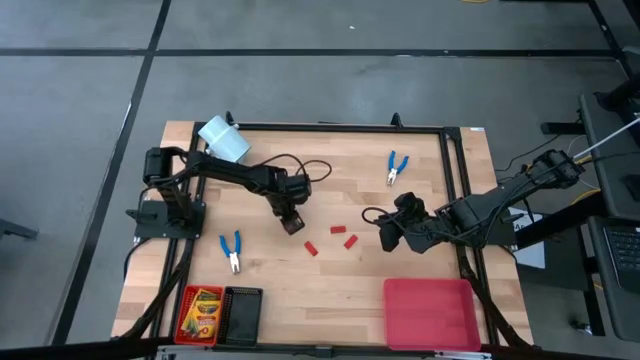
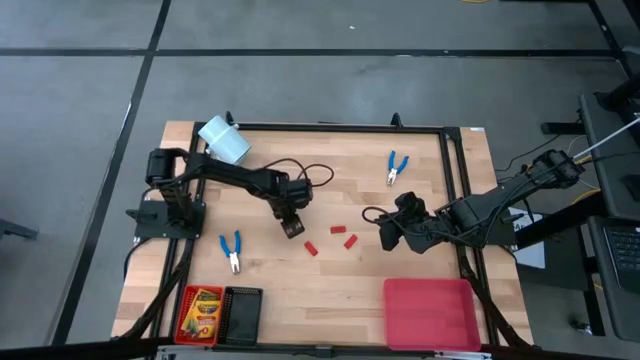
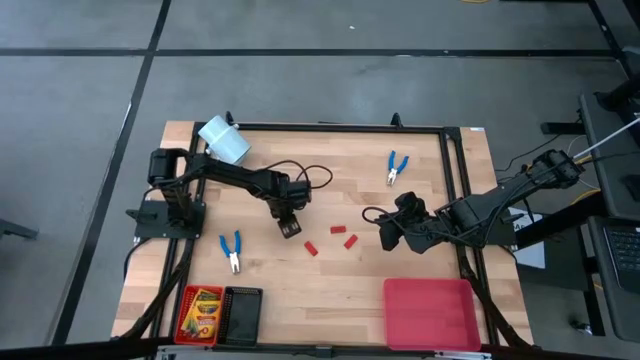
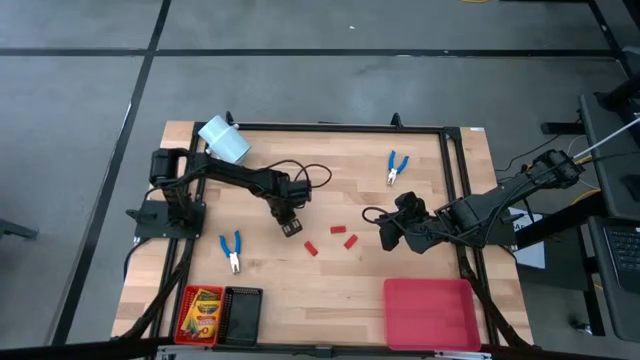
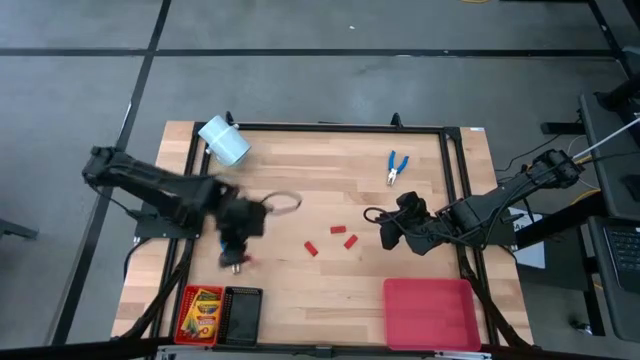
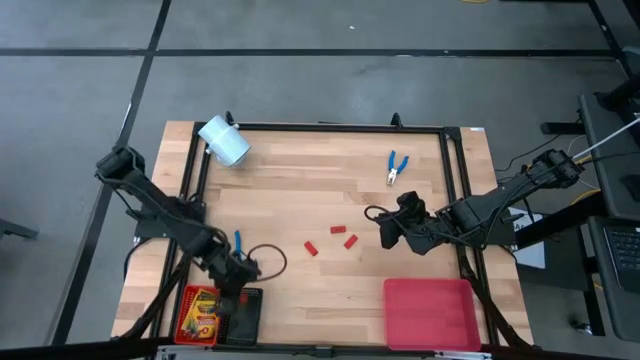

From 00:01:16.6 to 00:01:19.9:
Task: Pick & Place School Supplies
Put the red eraser into the black basket

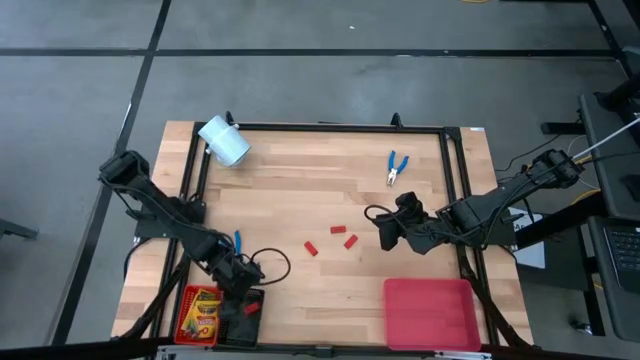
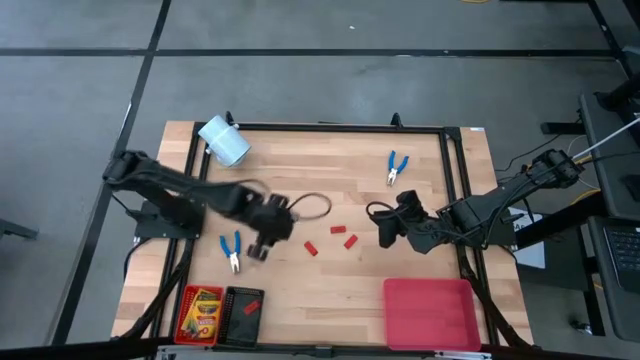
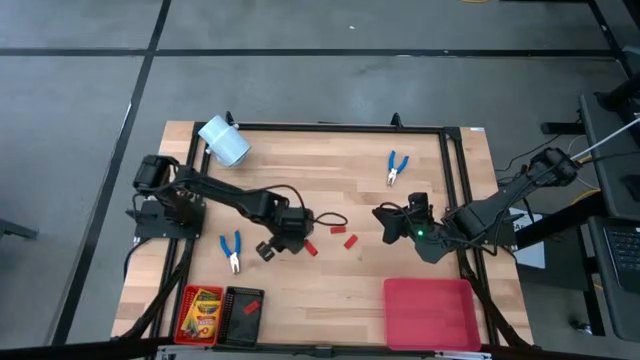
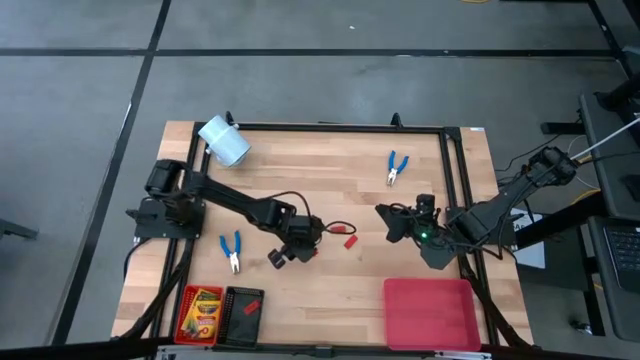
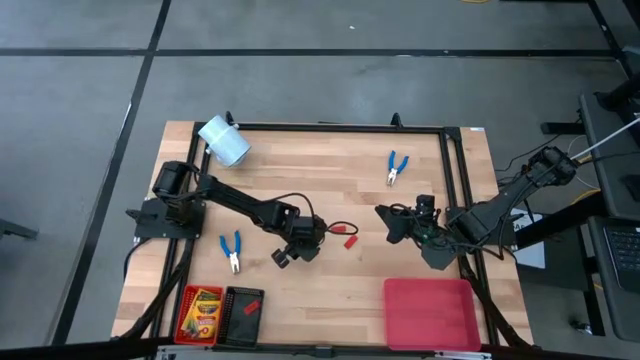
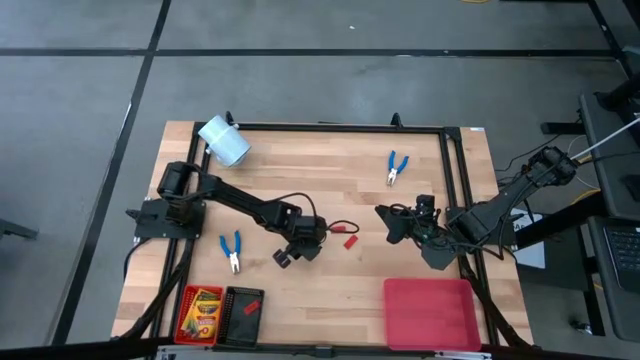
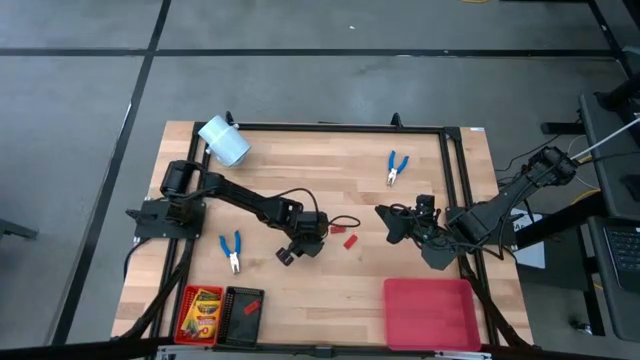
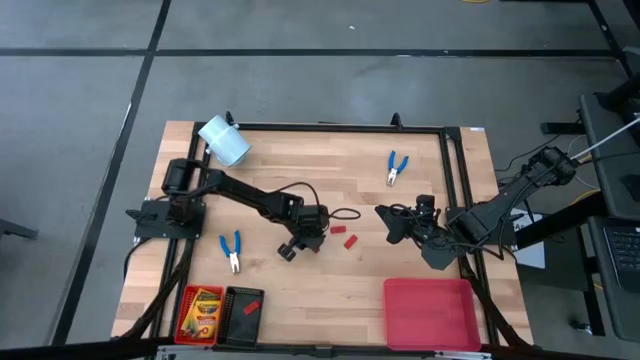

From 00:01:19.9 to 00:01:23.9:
Put the red eraser into the black basket

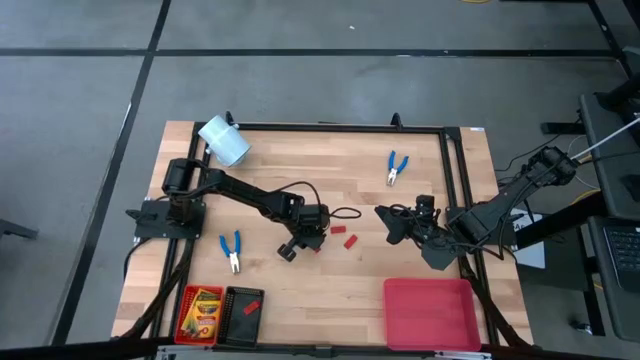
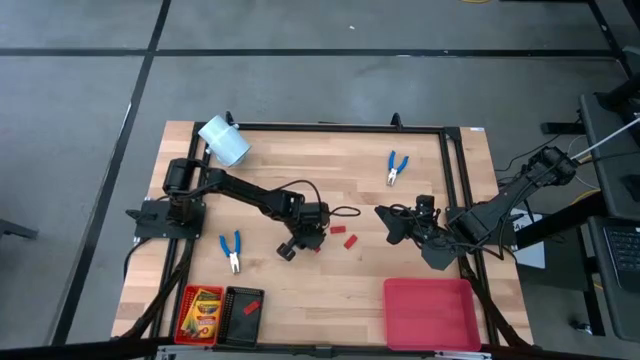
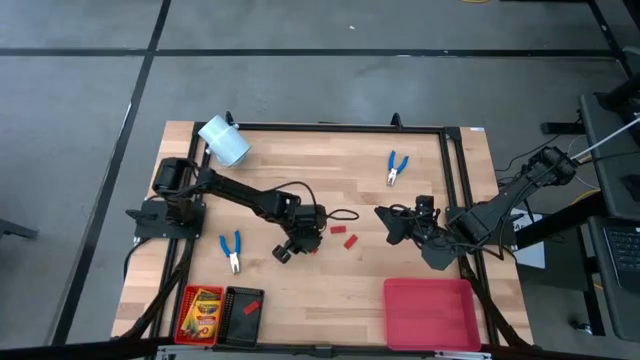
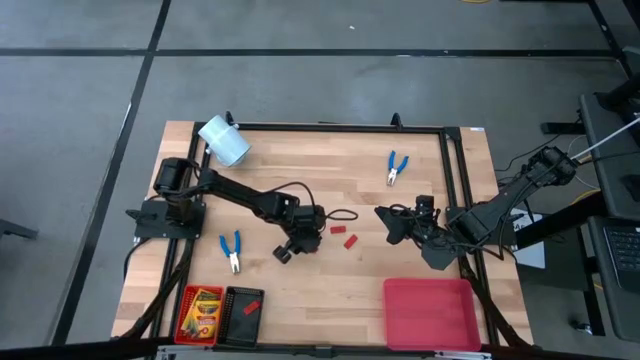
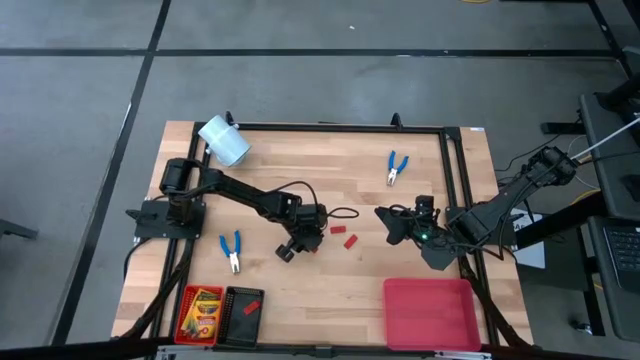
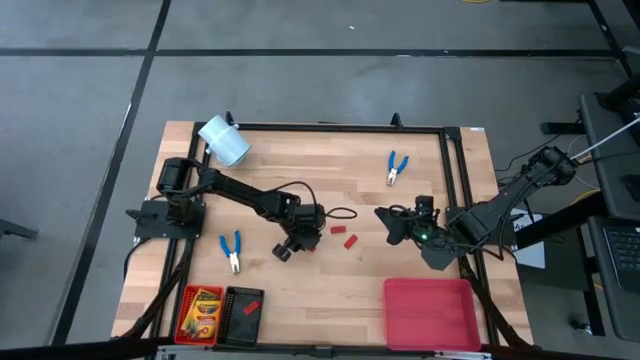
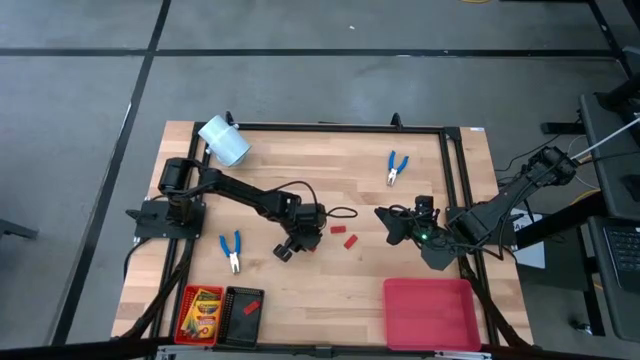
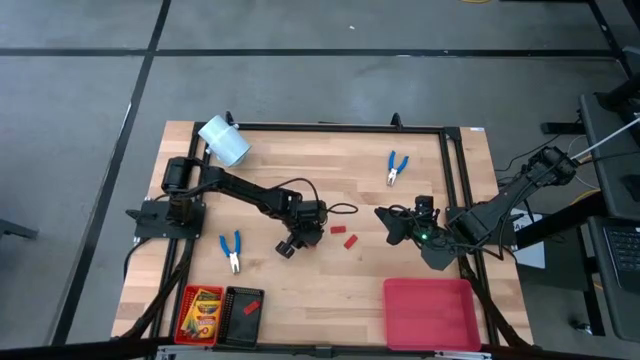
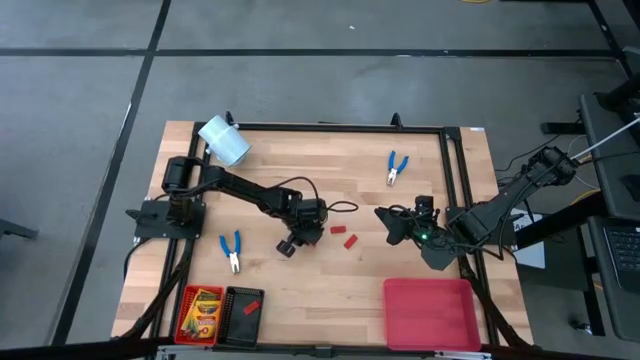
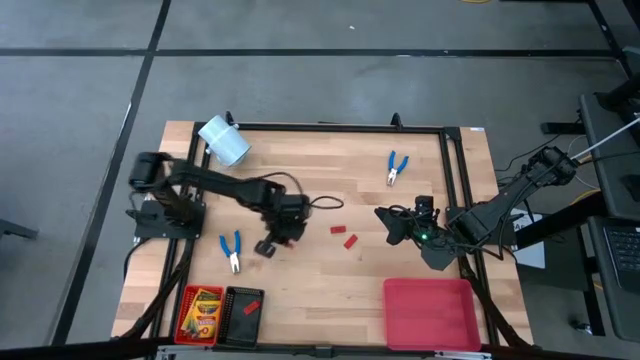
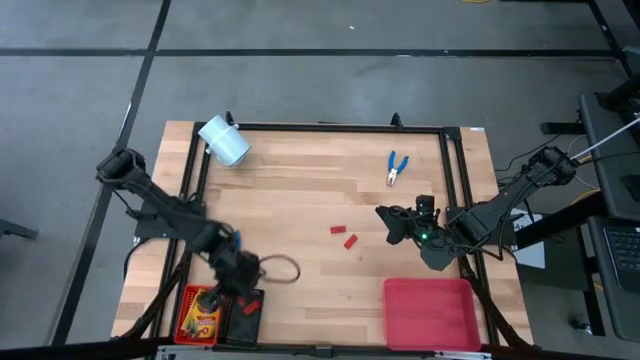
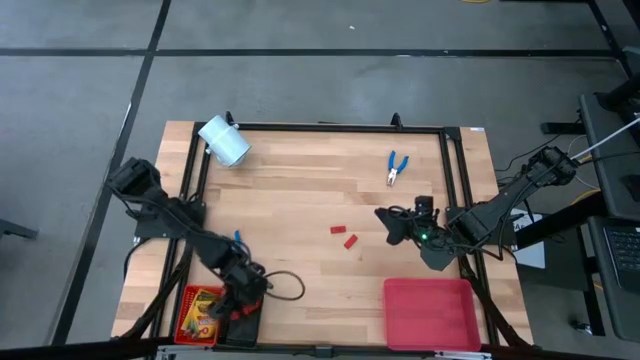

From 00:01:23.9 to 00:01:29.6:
Put the red eraser into the black basket

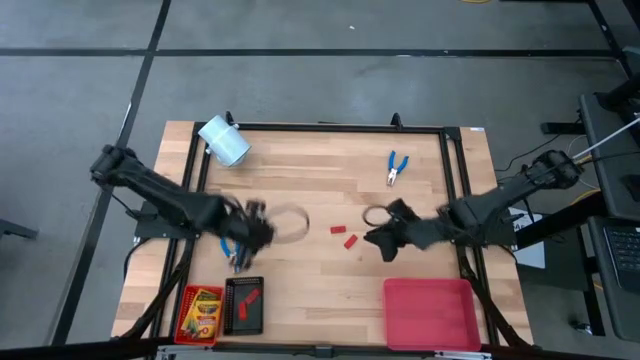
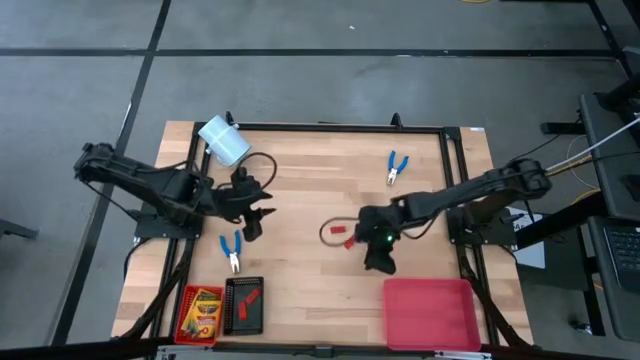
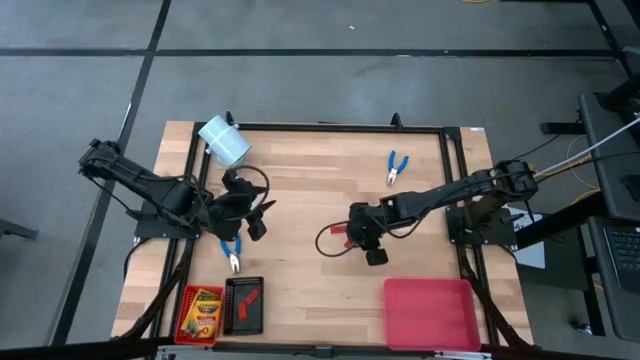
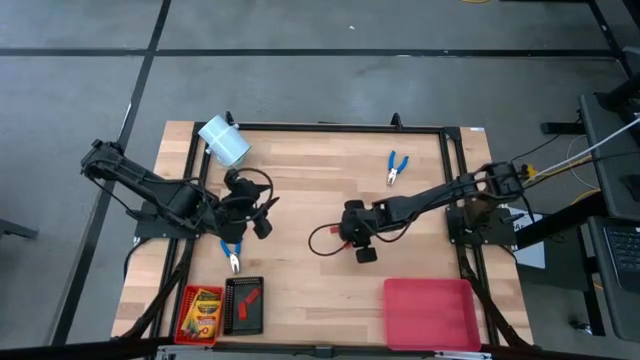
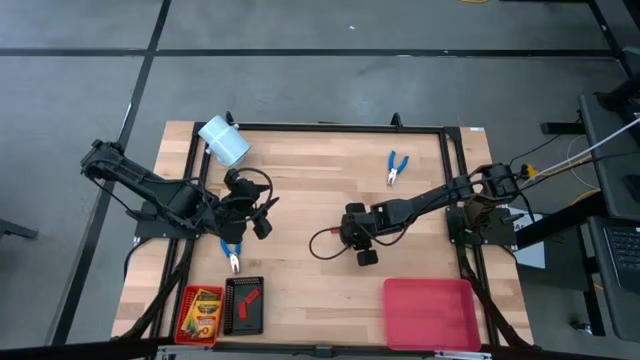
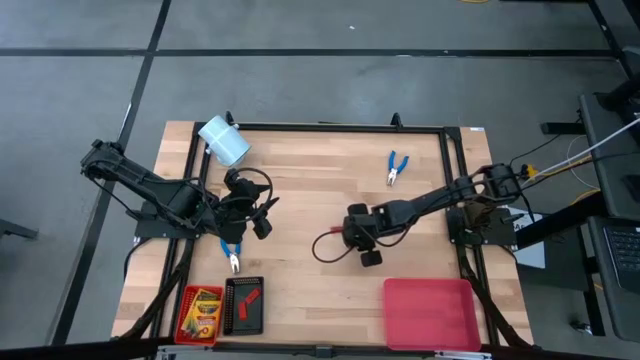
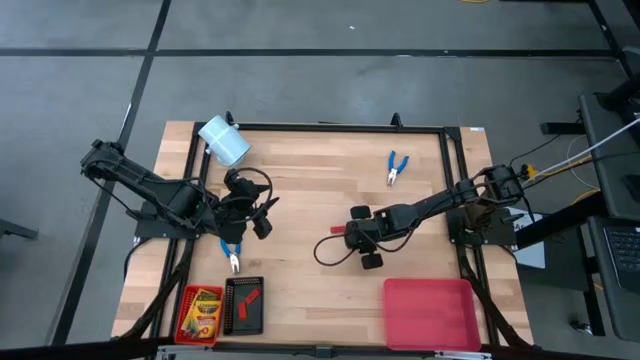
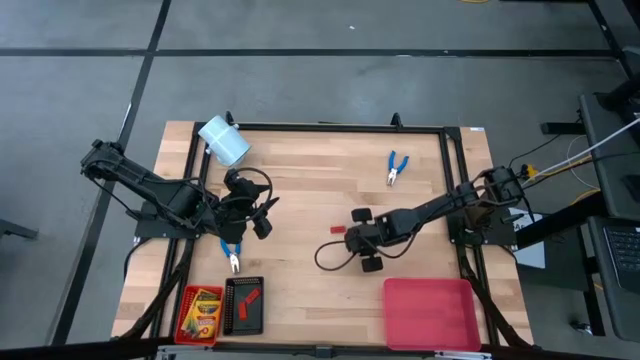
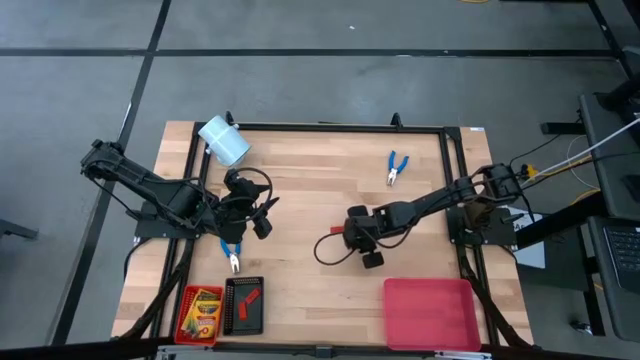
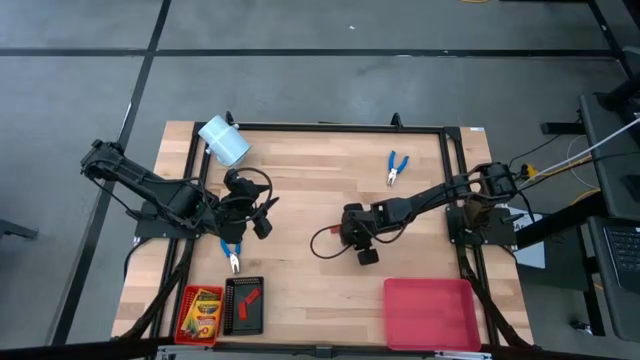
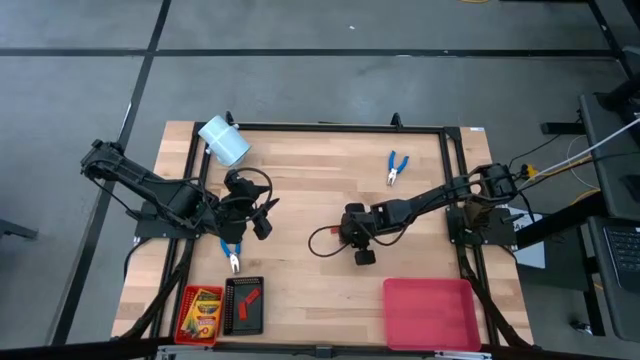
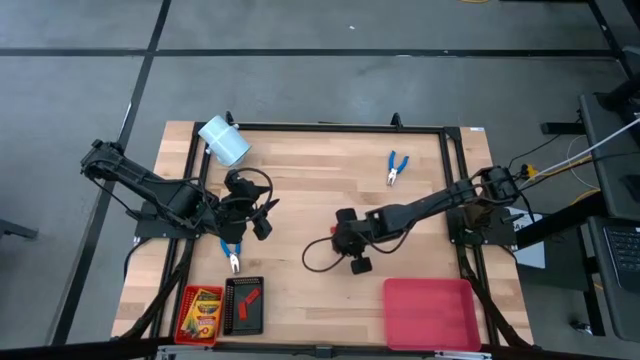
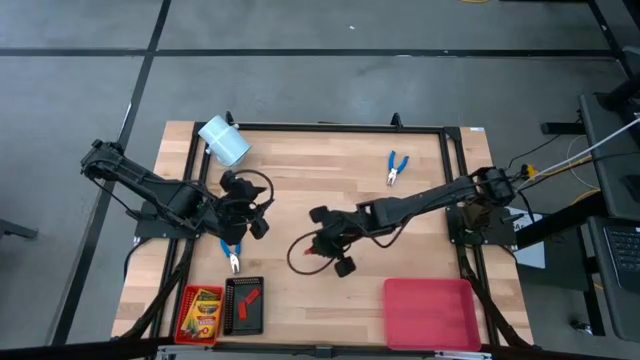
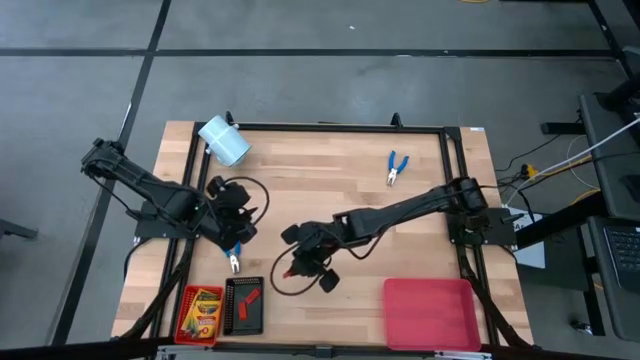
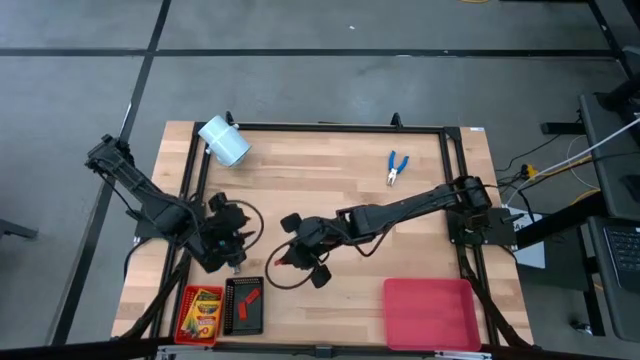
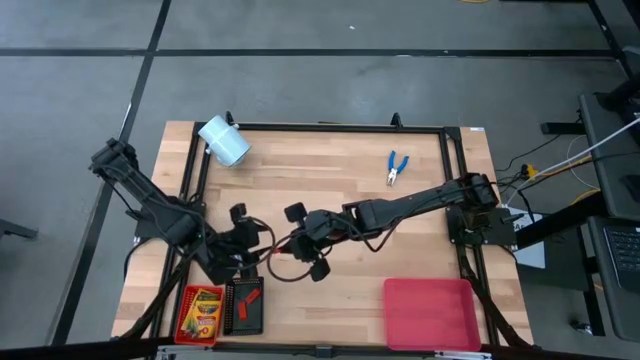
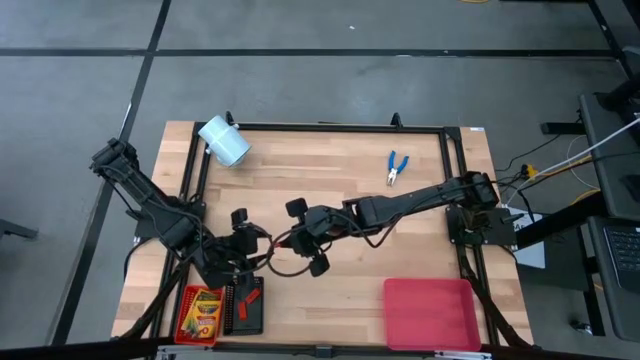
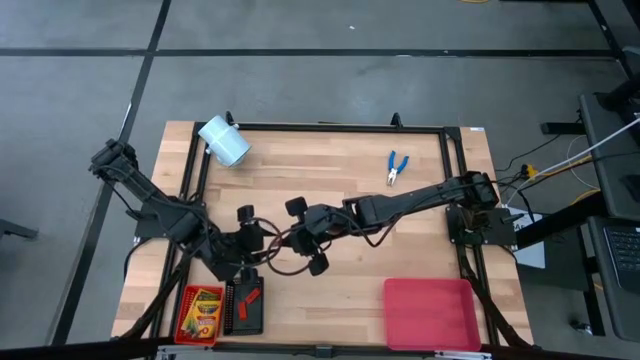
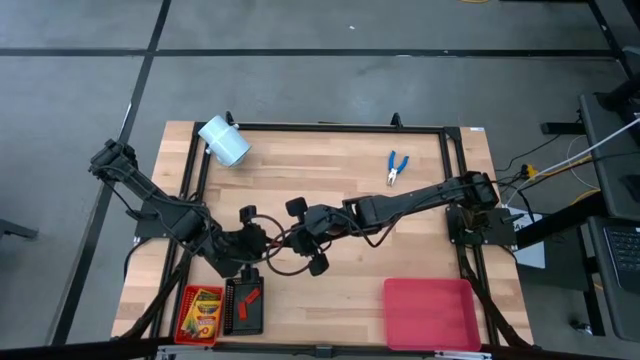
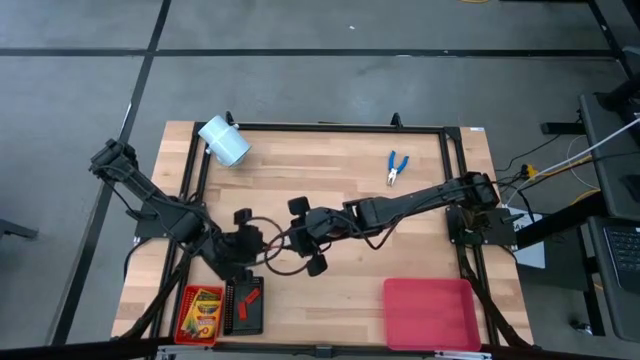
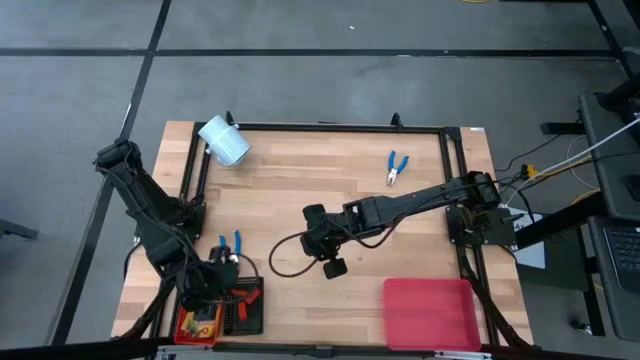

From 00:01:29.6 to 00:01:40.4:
Put the red eraser into the black basket
